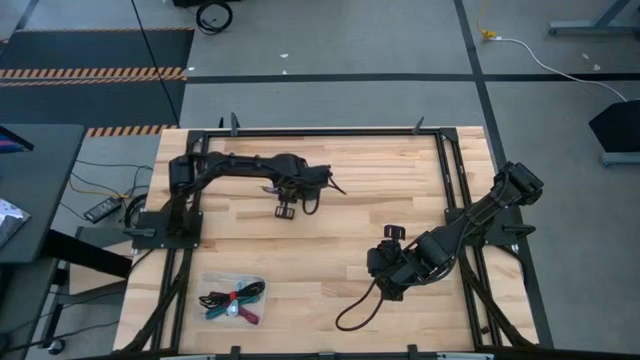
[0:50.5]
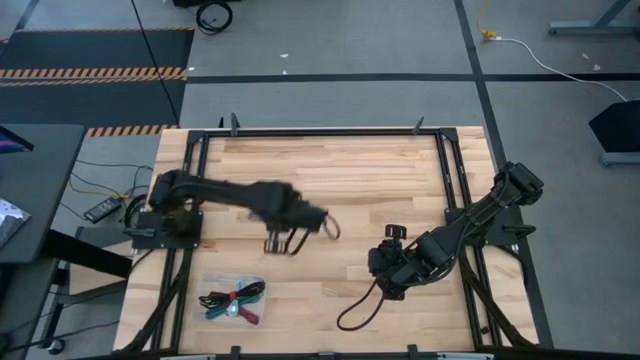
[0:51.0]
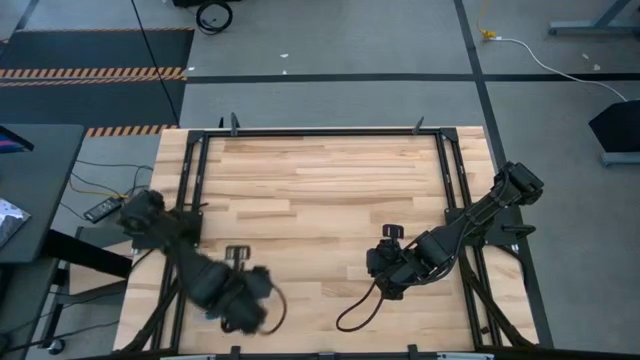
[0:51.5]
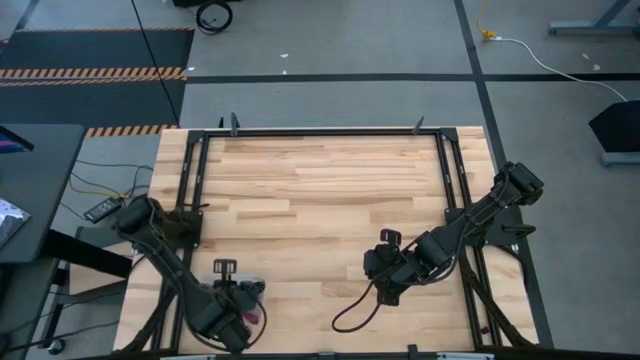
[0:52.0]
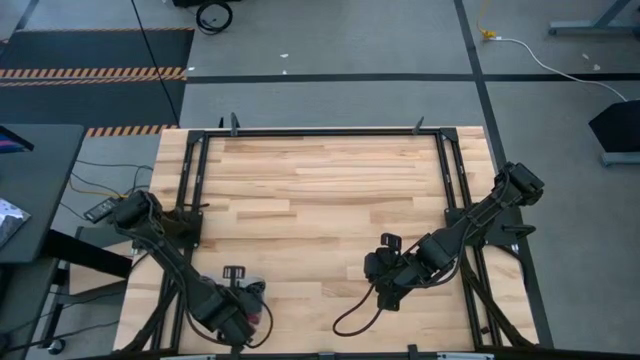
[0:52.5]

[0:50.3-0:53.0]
Task: Pick and place USB-C Cables
Put the violet charger cable into the transparent bin

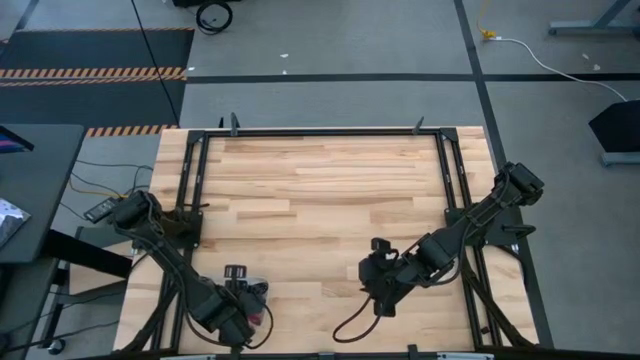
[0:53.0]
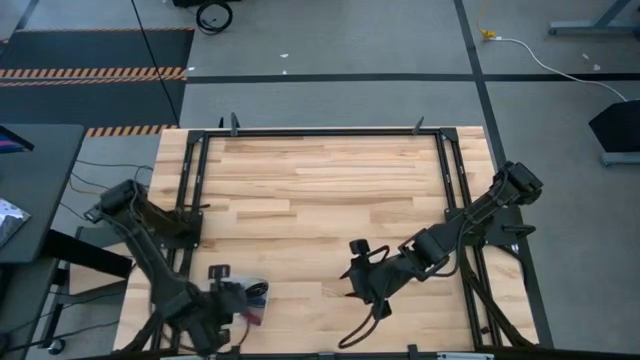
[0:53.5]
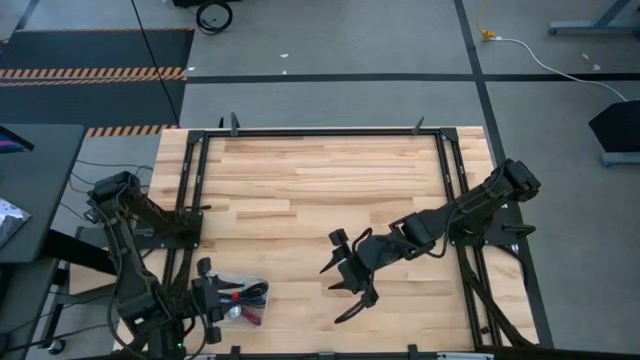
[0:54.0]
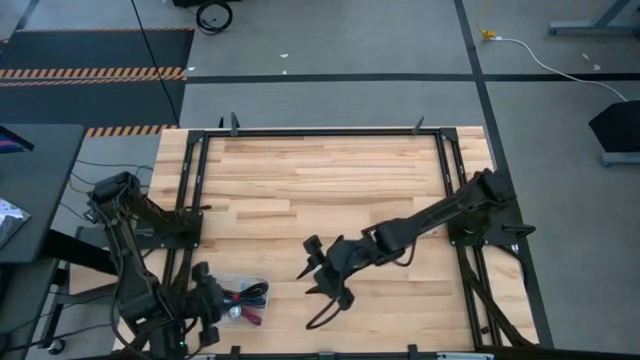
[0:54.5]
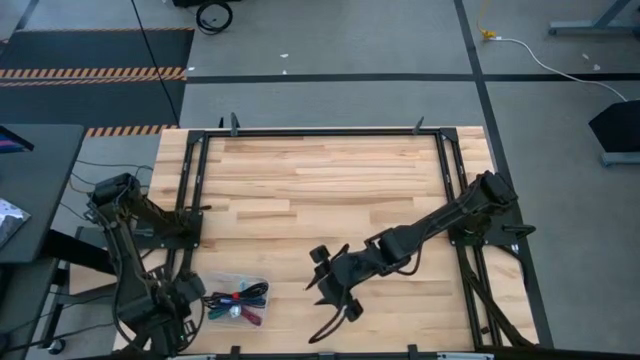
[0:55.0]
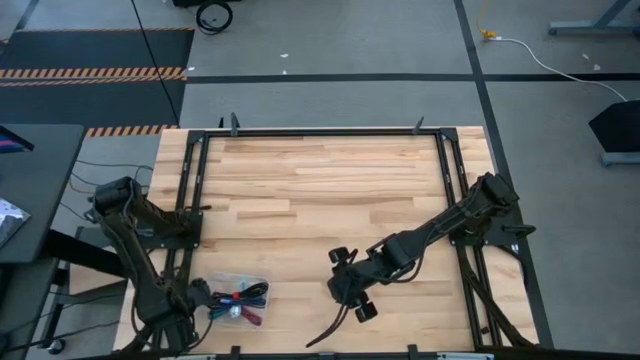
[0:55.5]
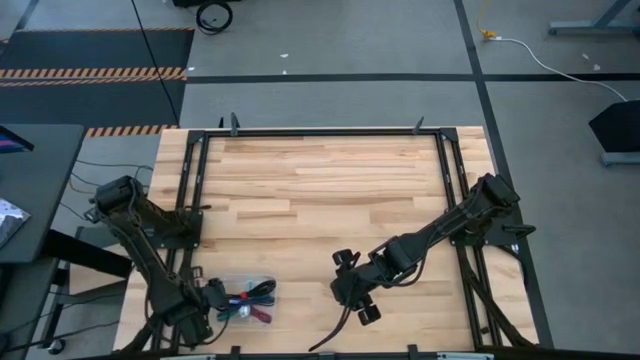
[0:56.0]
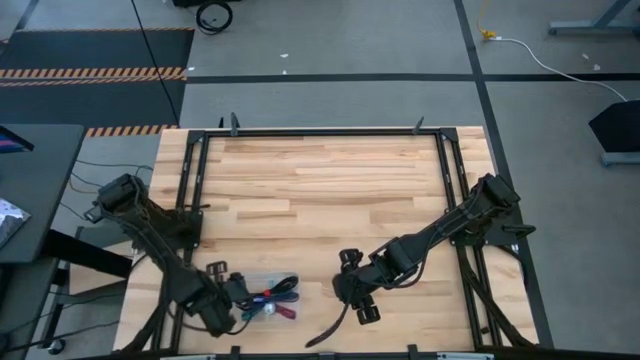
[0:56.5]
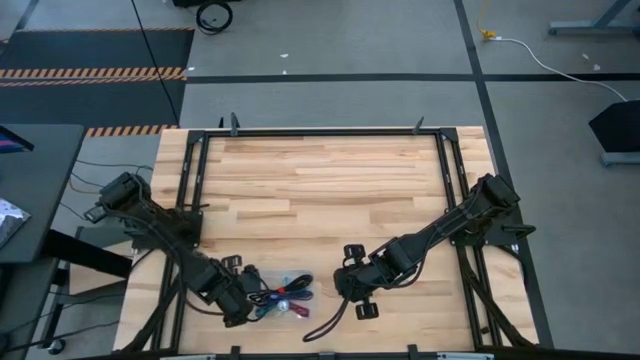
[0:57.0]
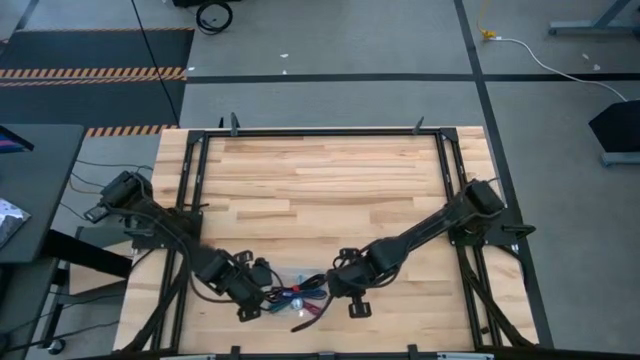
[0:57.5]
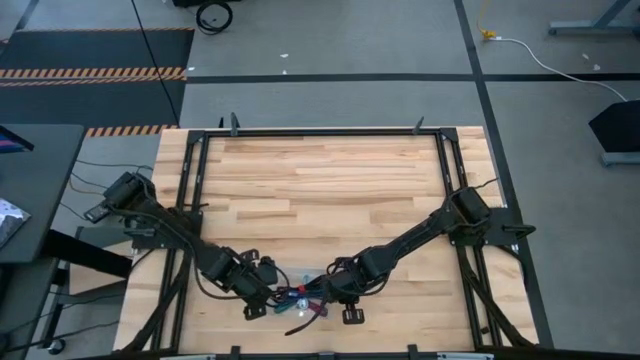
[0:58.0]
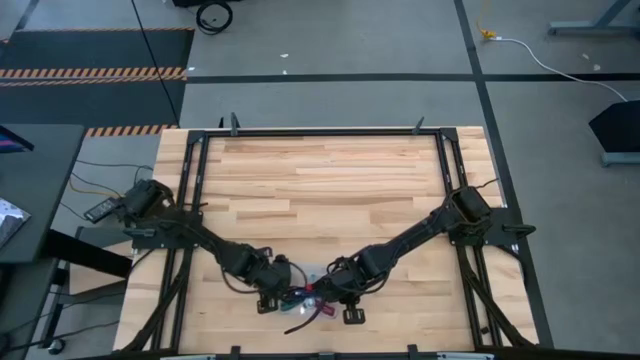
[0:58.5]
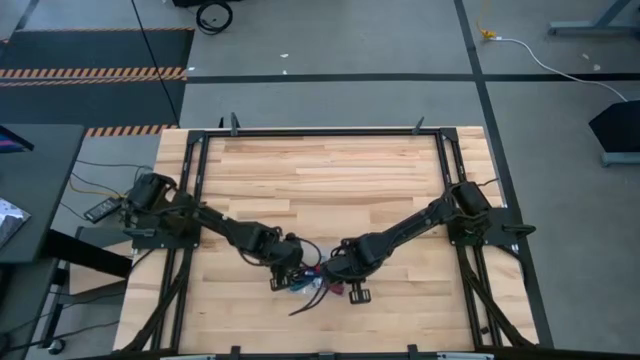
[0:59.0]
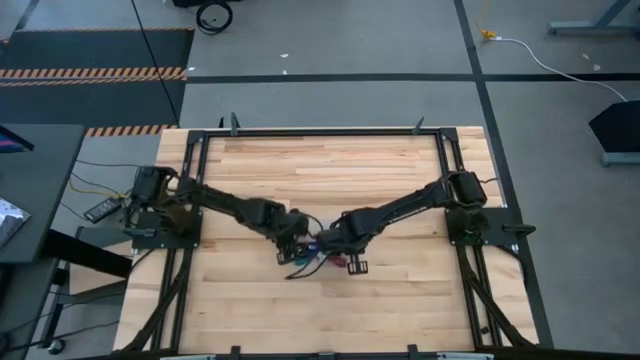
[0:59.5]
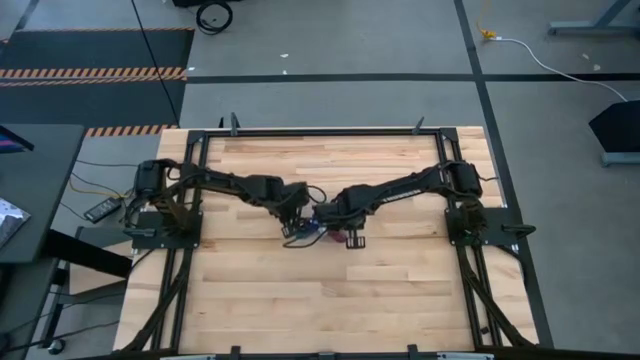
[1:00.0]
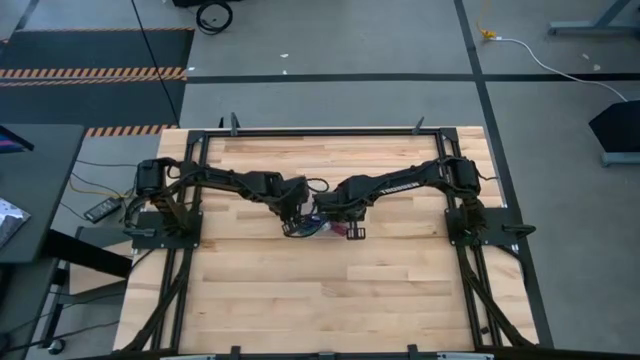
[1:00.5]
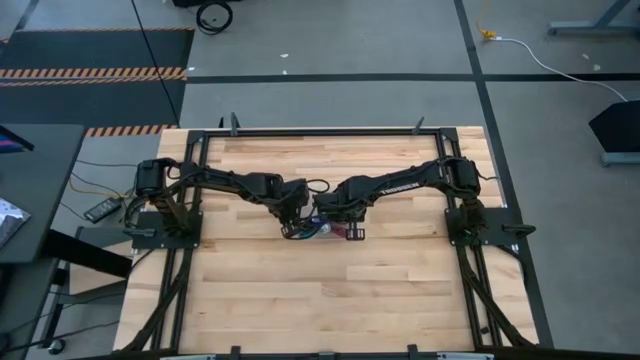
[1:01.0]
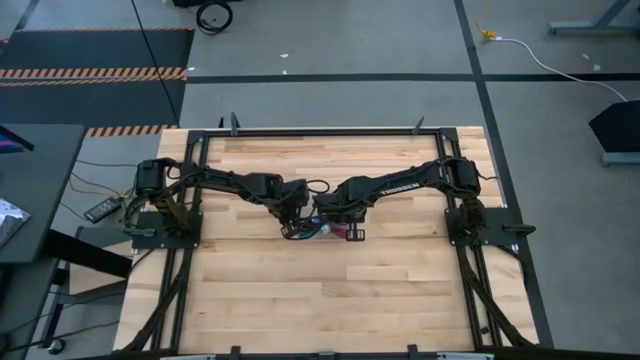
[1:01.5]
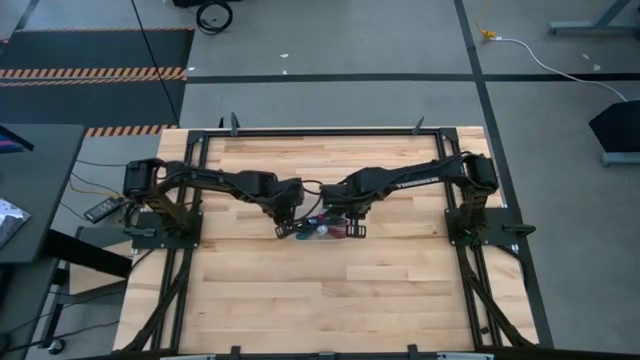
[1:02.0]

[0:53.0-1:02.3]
Move the transparent bin to the center of the table

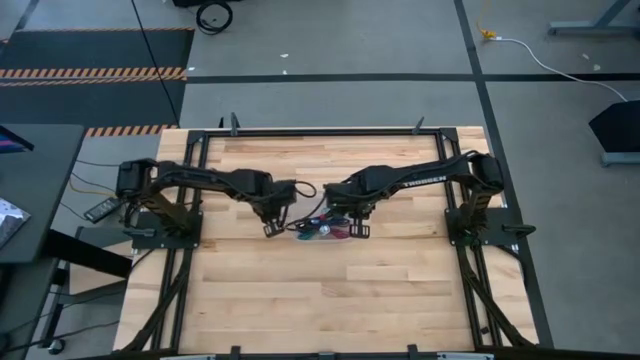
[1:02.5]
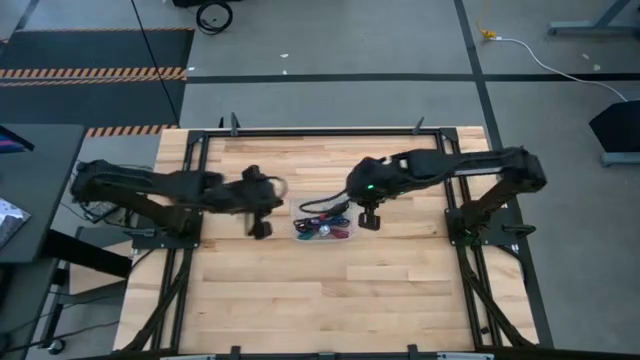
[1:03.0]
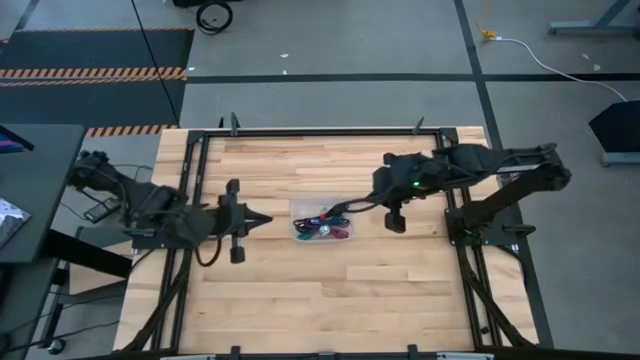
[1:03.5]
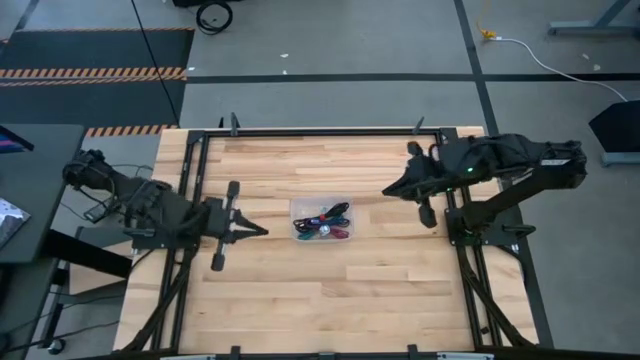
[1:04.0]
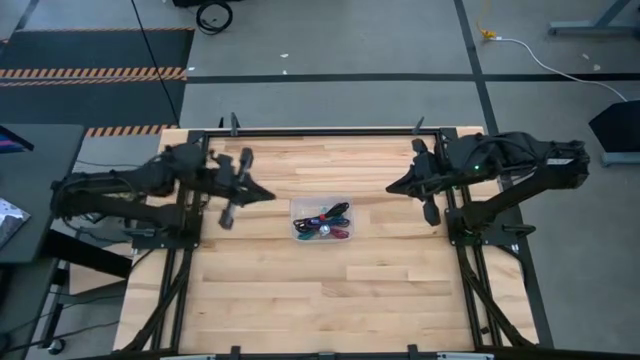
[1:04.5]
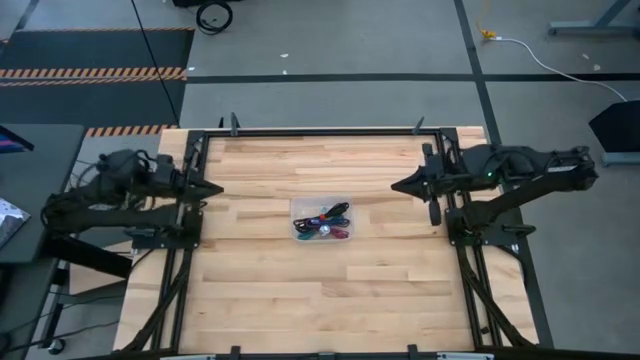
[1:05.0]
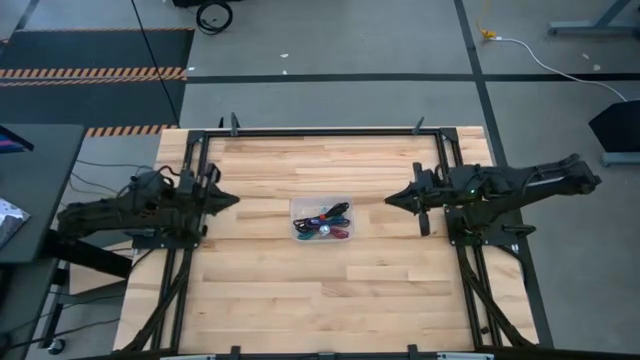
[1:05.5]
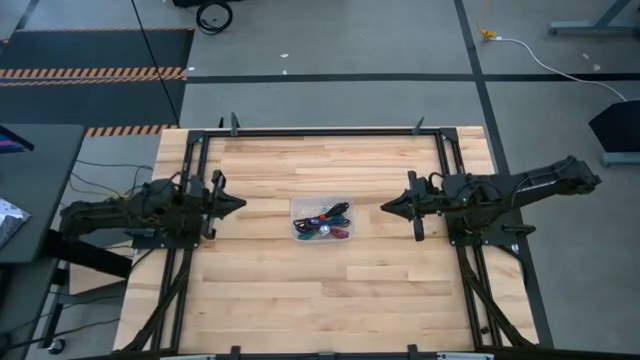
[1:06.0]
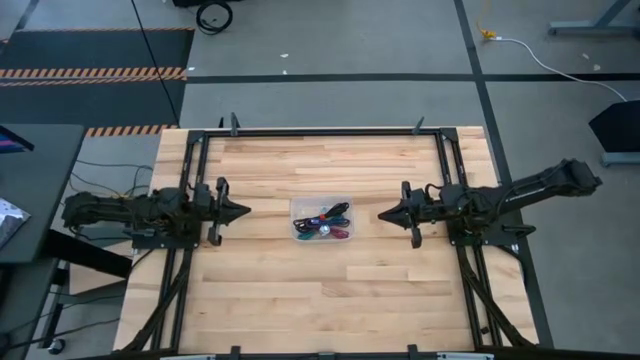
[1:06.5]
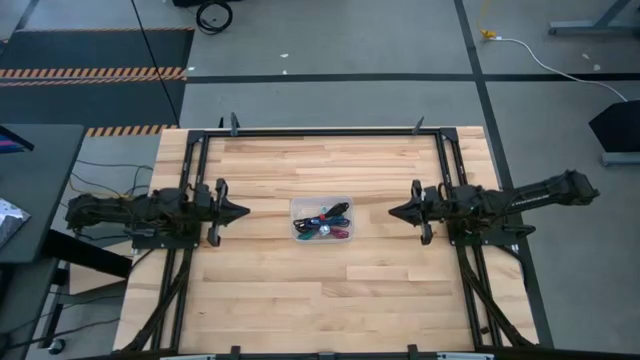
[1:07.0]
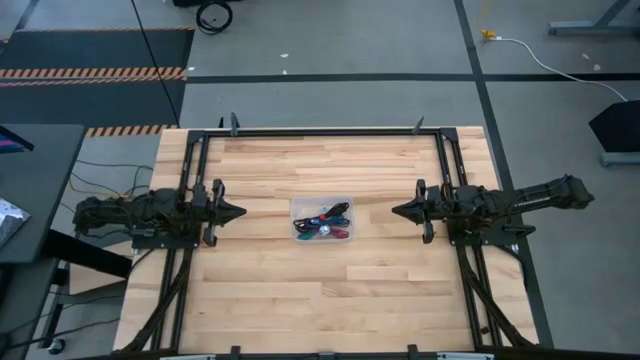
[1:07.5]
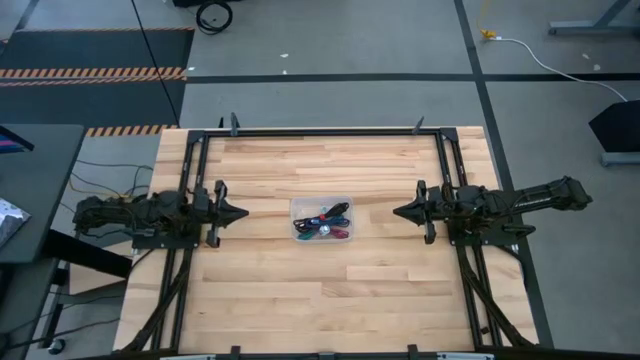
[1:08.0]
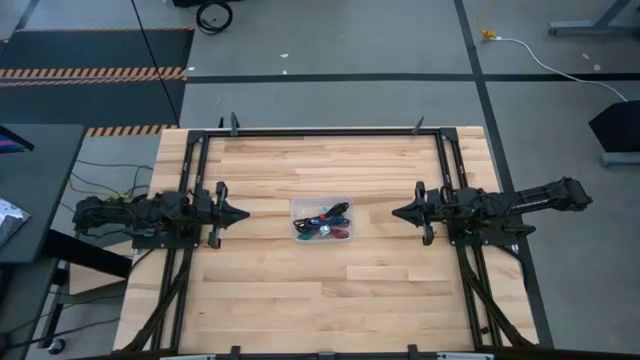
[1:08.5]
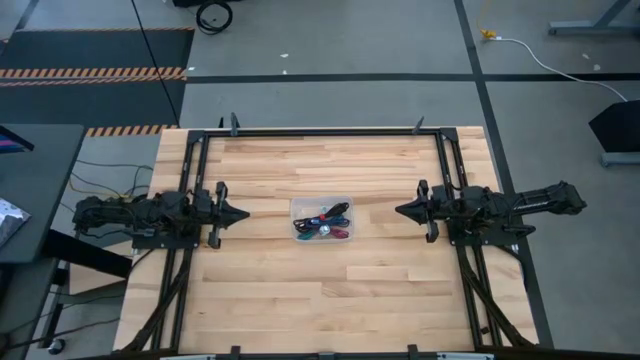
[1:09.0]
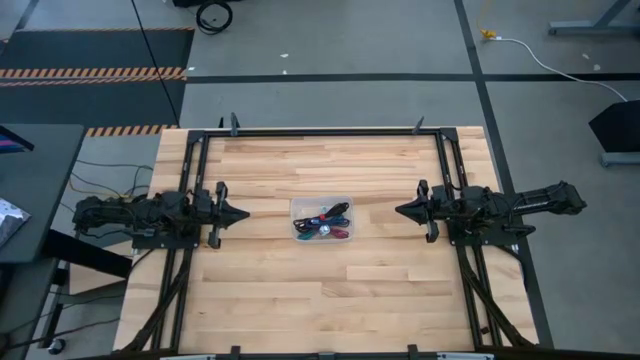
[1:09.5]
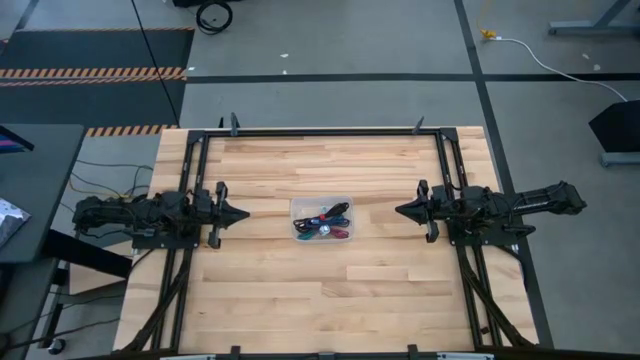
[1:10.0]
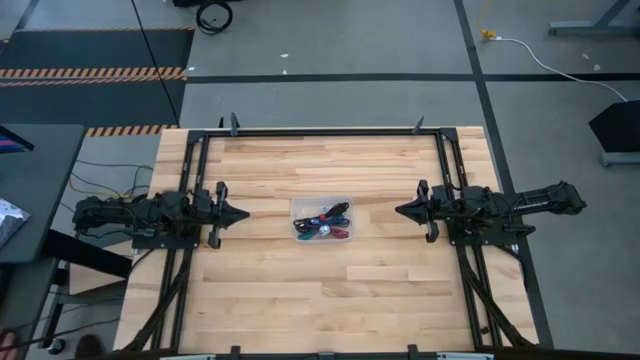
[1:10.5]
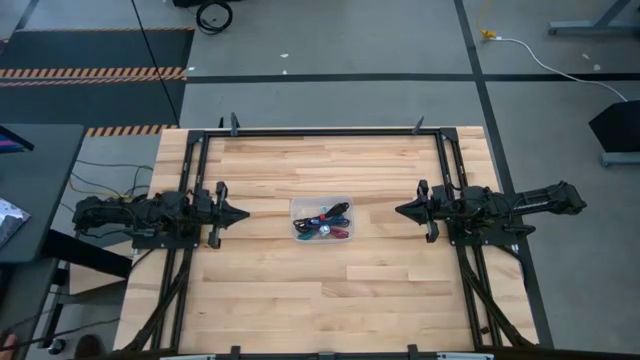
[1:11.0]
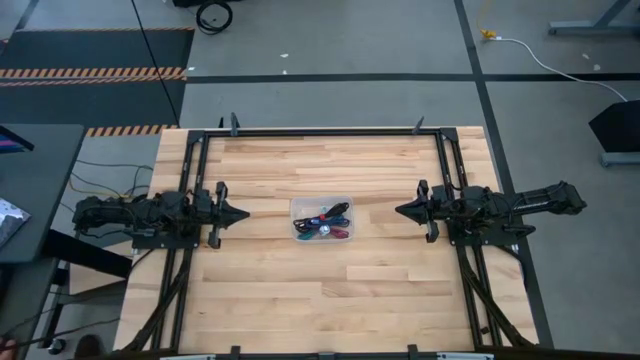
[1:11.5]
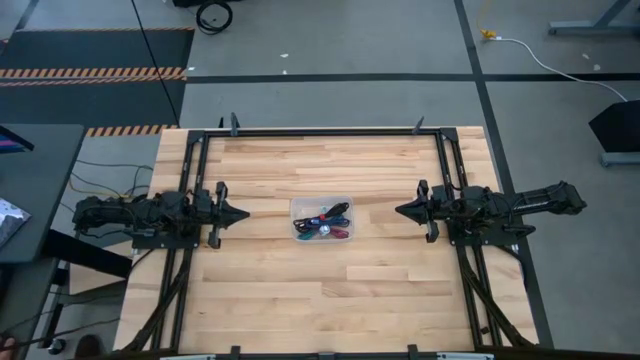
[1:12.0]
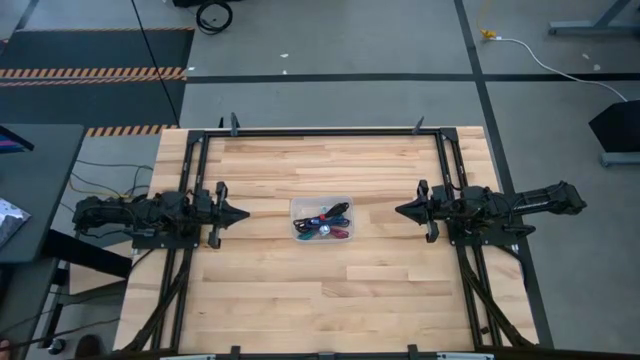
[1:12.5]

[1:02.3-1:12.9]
Return to Home Position
